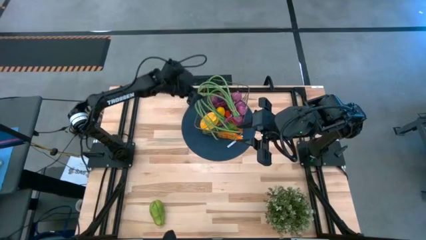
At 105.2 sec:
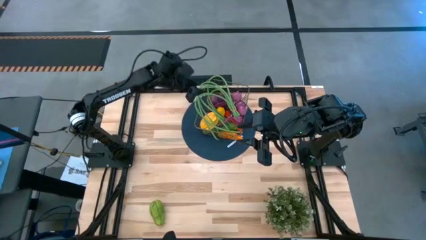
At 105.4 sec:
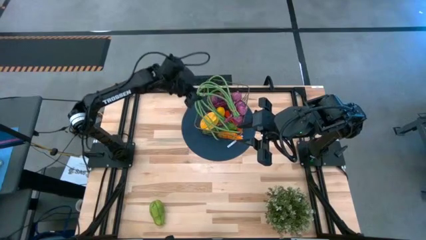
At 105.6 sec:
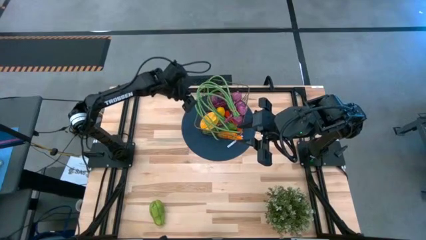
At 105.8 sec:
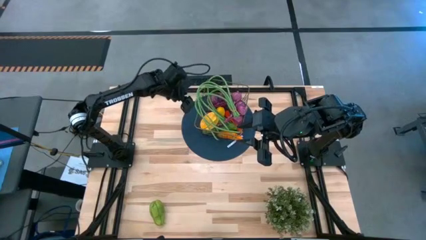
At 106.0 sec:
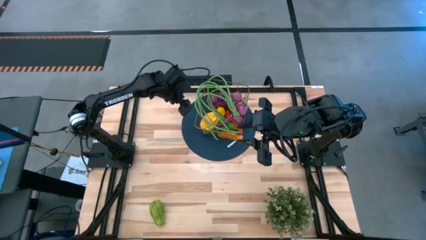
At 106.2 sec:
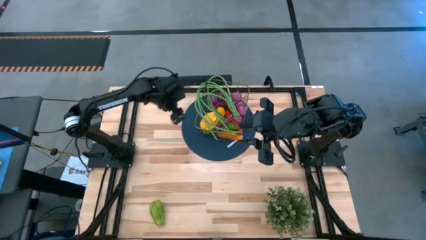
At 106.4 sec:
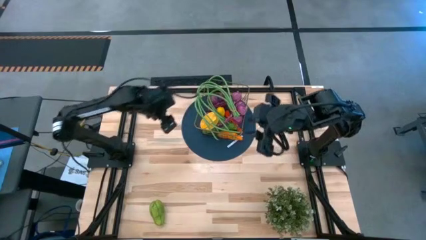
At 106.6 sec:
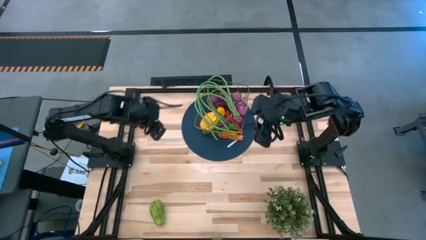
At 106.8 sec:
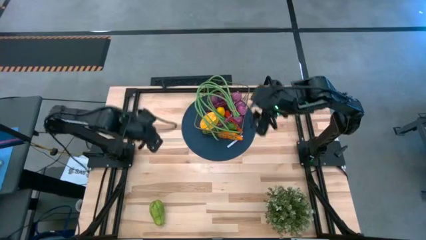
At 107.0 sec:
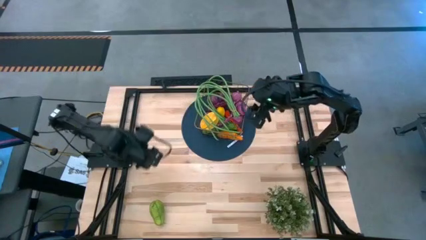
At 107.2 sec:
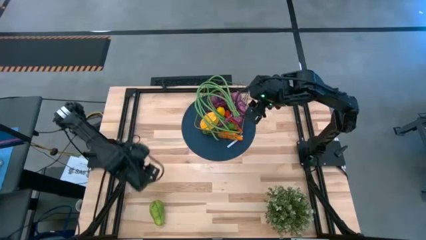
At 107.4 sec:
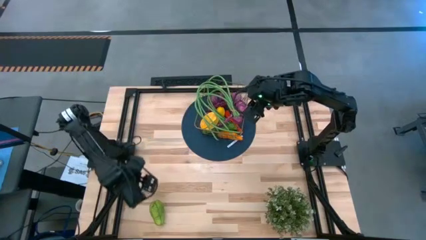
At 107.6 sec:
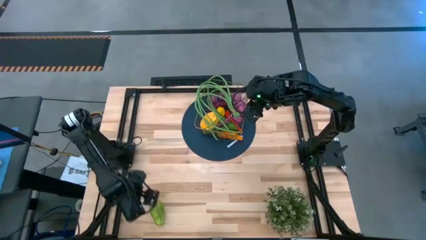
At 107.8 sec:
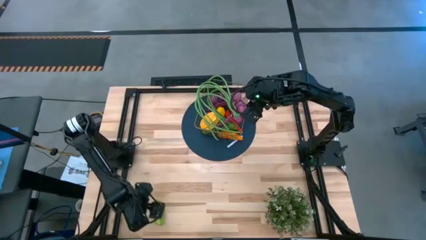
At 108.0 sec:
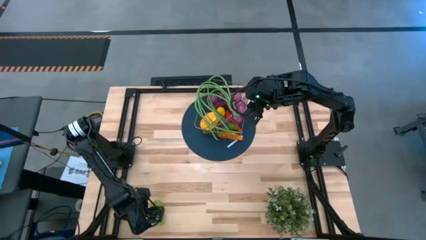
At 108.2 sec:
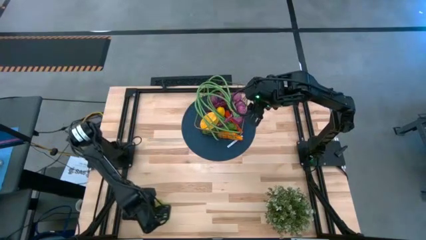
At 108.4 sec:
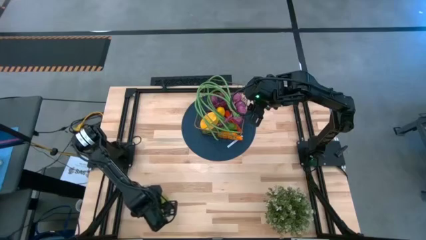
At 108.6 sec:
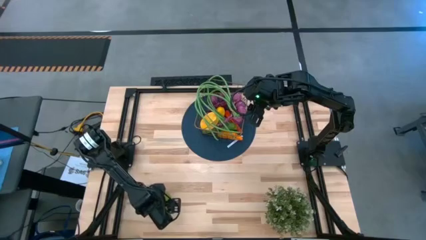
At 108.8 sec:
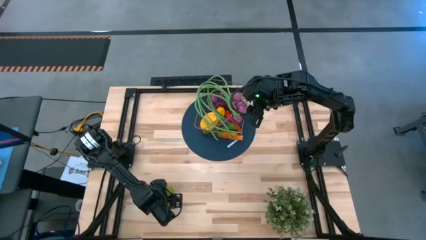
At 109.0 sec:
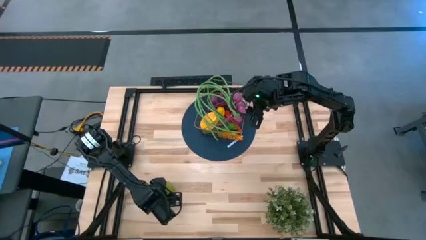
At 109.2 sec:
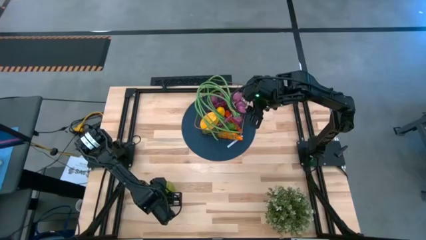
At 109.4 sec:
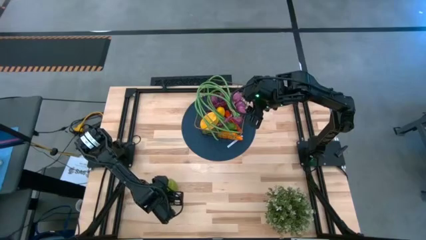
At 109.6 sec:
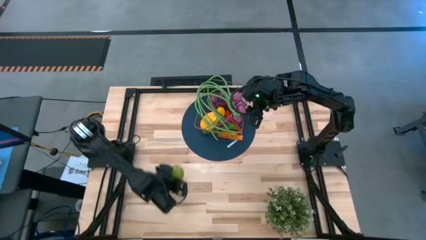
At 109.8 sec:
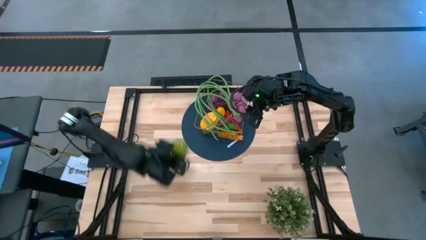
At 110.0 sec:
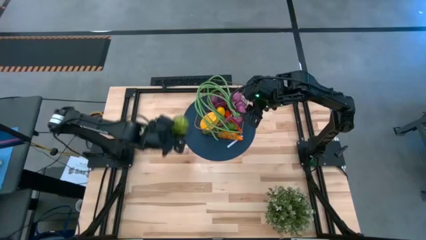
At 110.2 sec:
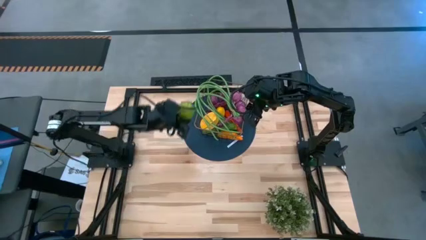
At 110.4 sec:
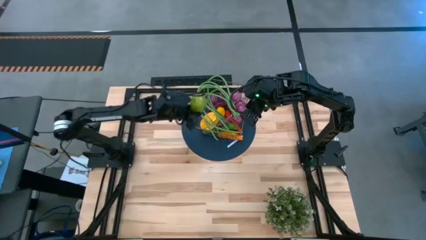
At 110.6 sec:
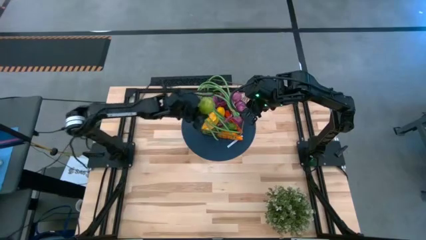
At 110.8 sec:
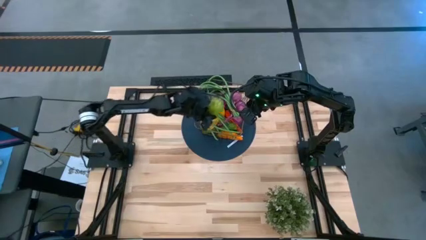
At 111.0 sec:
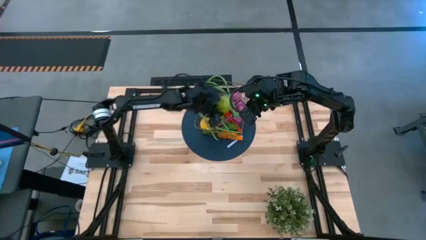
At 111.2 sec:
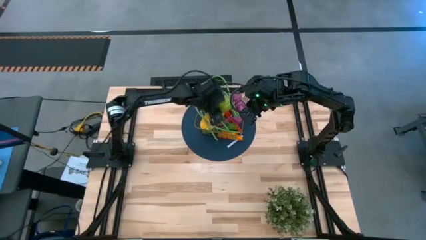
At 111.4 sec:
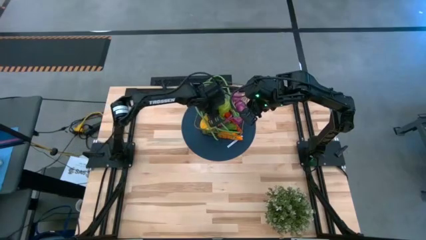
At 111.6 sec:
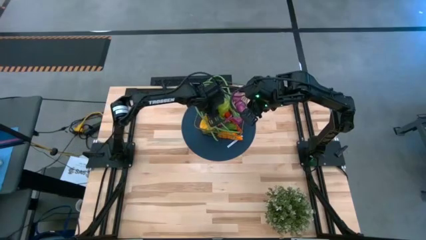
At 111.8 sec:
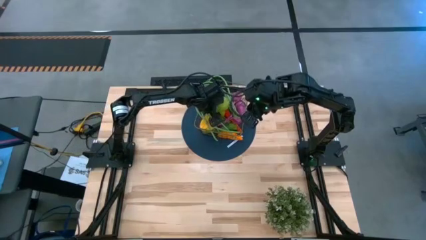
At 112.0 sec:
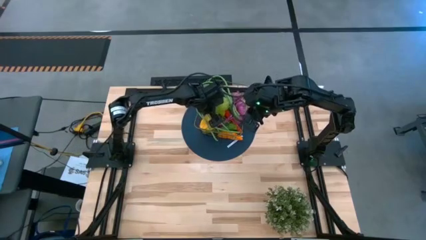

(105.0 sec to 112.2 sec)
Task: Build produce basket
Put the chayote into the wire basket

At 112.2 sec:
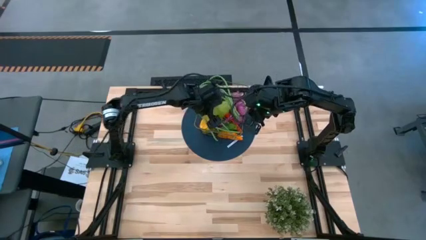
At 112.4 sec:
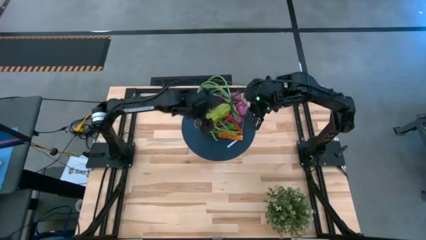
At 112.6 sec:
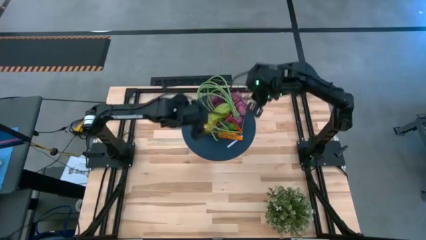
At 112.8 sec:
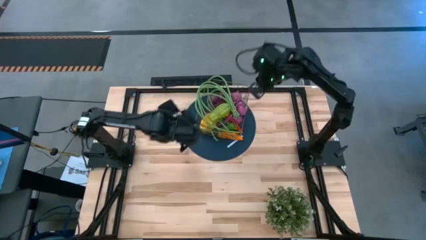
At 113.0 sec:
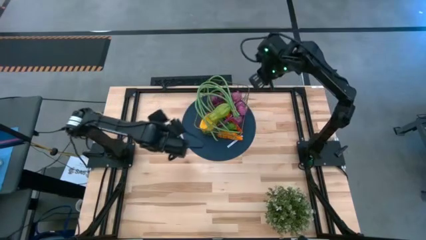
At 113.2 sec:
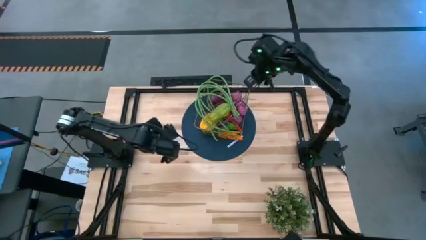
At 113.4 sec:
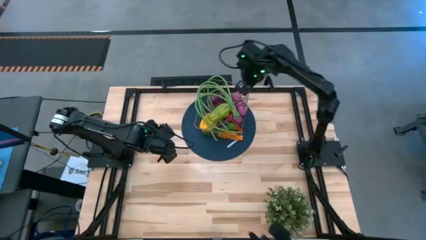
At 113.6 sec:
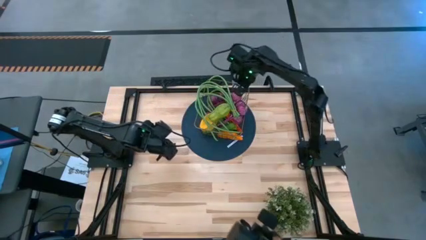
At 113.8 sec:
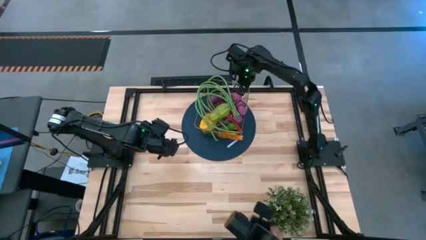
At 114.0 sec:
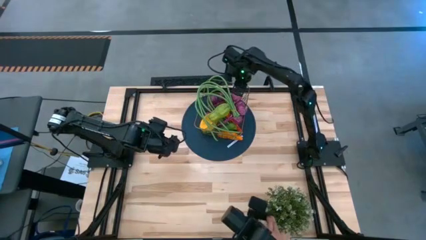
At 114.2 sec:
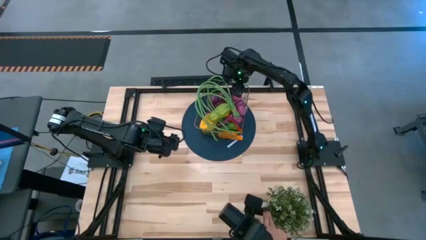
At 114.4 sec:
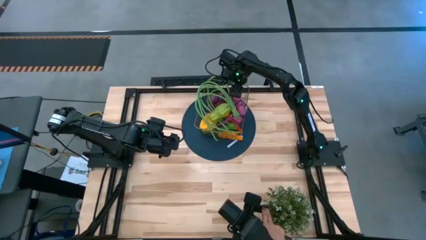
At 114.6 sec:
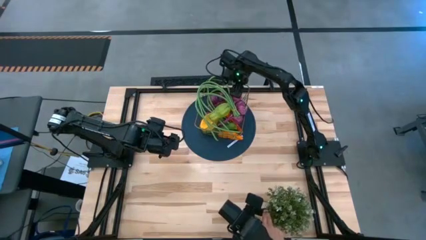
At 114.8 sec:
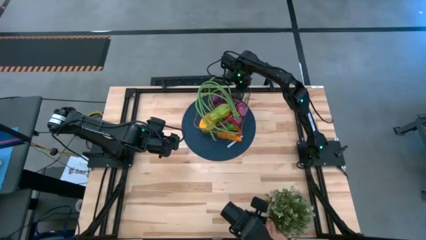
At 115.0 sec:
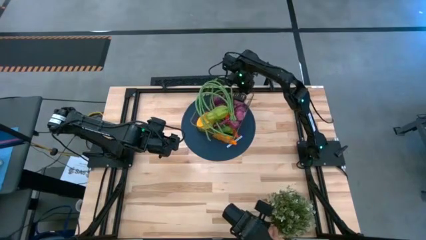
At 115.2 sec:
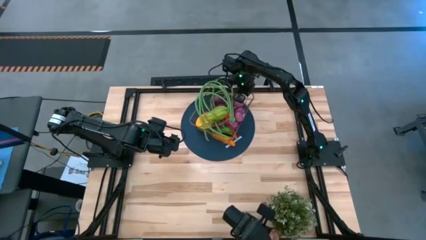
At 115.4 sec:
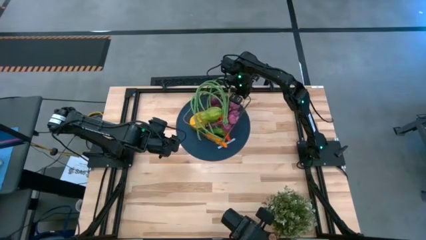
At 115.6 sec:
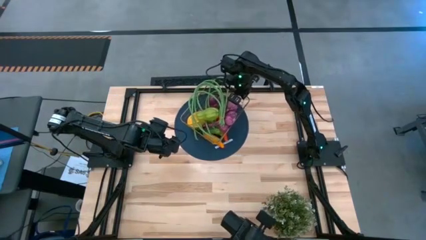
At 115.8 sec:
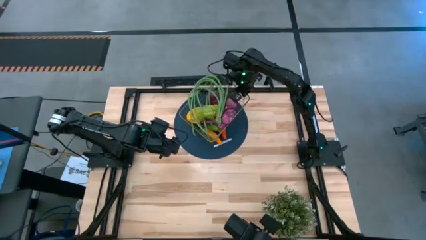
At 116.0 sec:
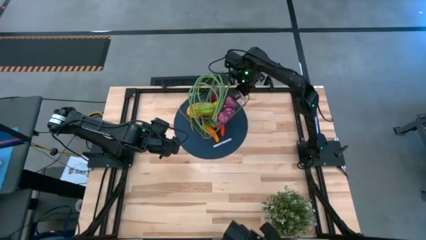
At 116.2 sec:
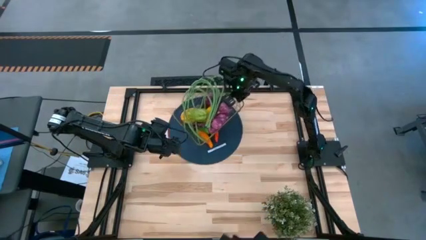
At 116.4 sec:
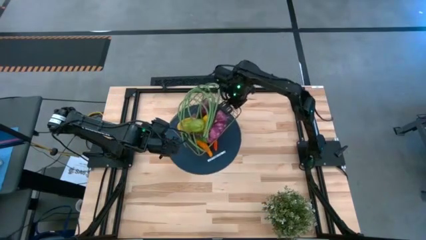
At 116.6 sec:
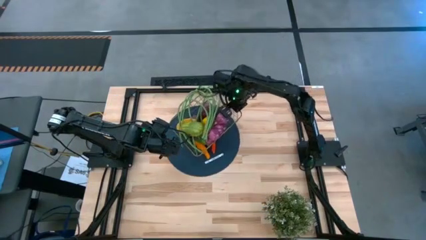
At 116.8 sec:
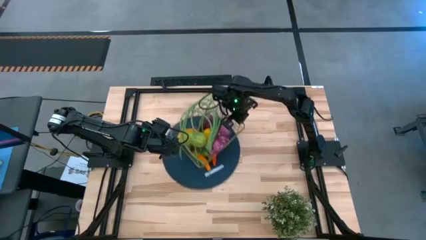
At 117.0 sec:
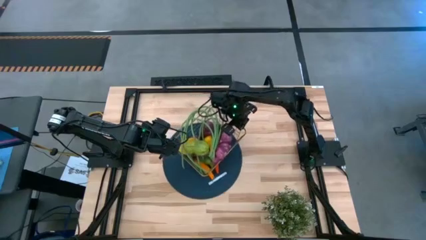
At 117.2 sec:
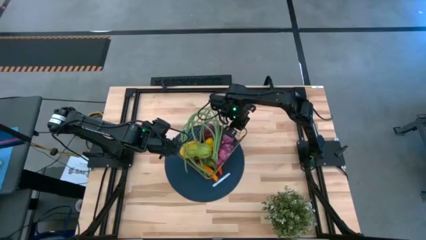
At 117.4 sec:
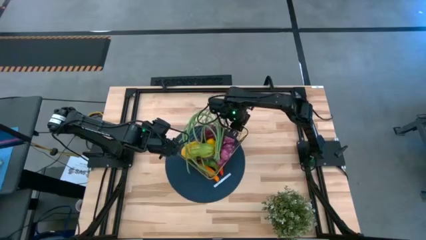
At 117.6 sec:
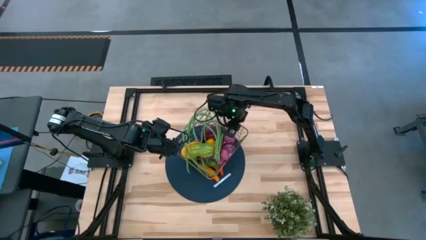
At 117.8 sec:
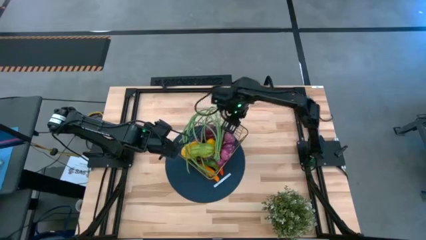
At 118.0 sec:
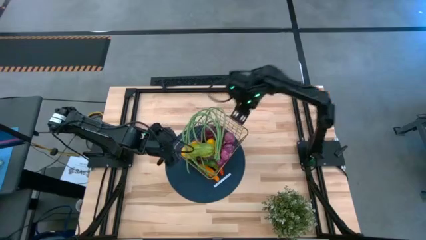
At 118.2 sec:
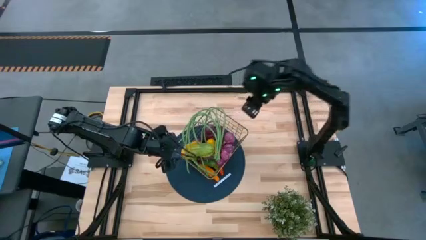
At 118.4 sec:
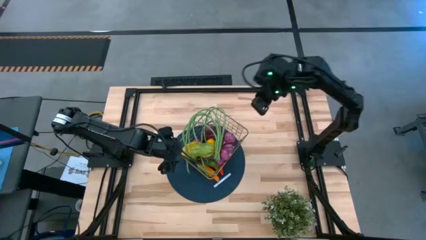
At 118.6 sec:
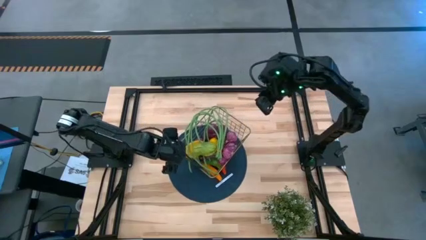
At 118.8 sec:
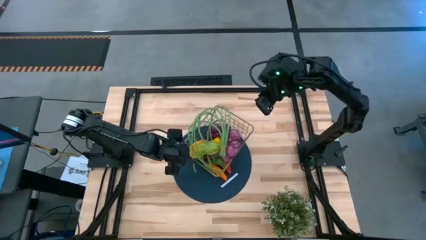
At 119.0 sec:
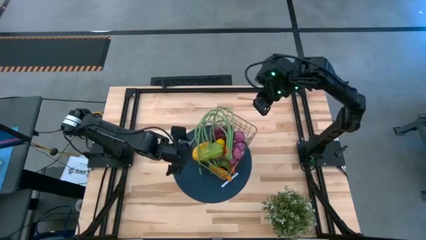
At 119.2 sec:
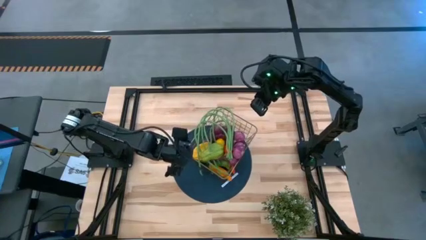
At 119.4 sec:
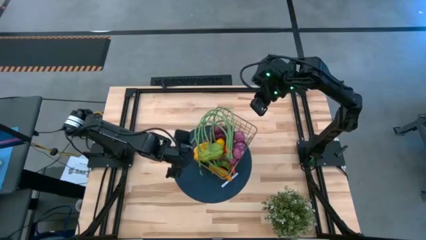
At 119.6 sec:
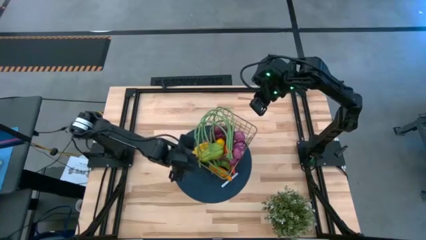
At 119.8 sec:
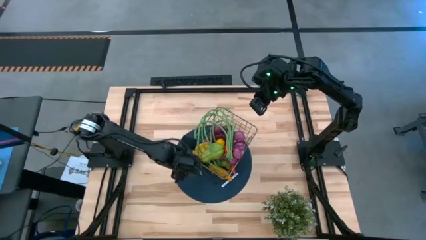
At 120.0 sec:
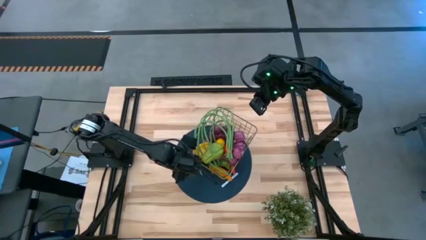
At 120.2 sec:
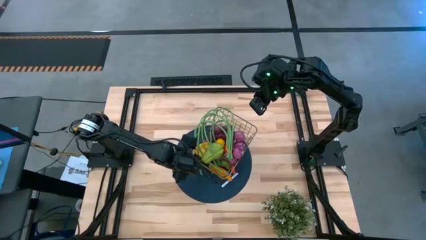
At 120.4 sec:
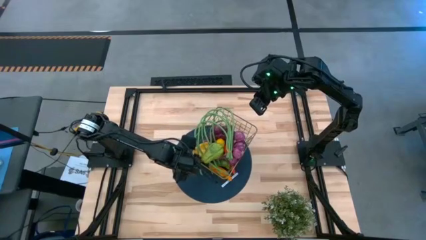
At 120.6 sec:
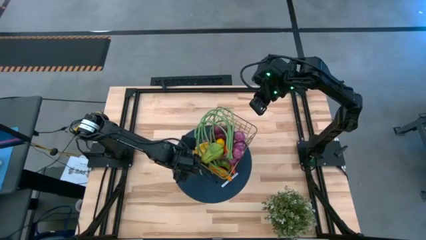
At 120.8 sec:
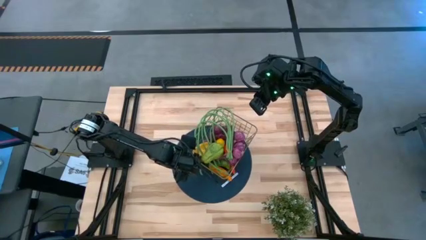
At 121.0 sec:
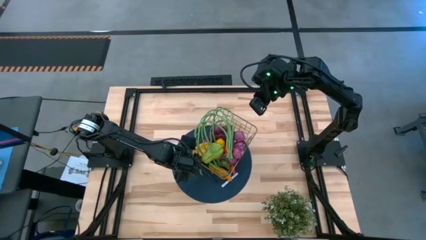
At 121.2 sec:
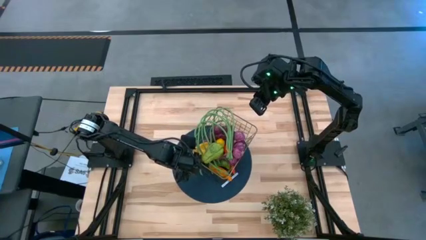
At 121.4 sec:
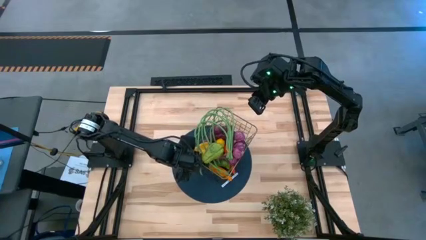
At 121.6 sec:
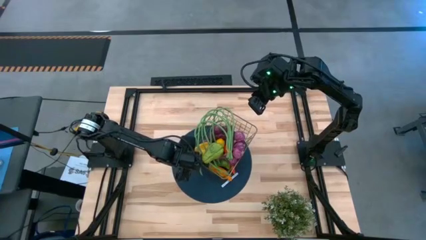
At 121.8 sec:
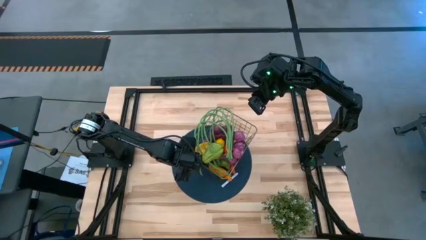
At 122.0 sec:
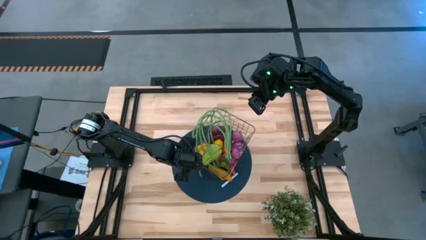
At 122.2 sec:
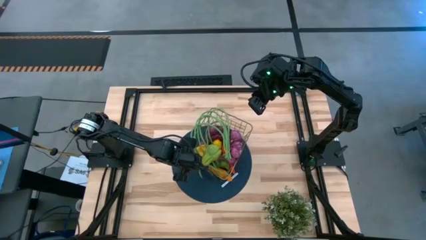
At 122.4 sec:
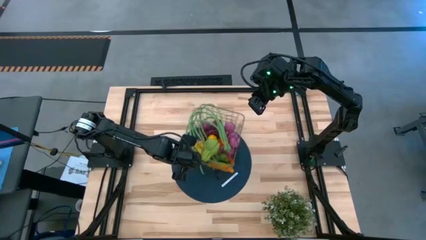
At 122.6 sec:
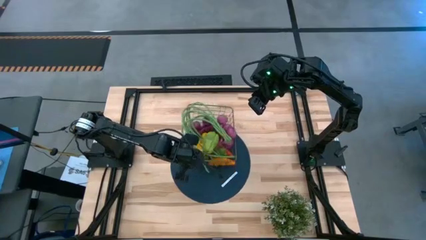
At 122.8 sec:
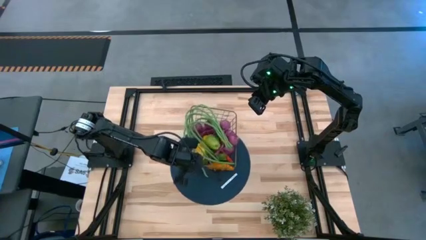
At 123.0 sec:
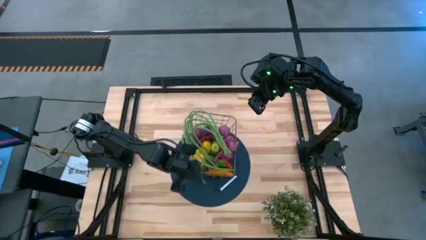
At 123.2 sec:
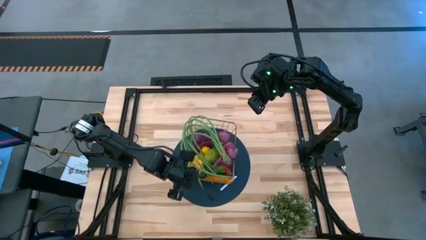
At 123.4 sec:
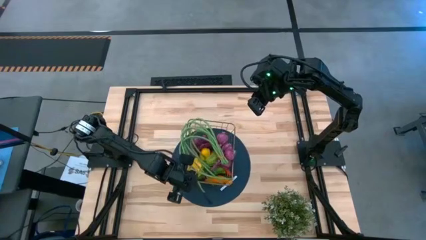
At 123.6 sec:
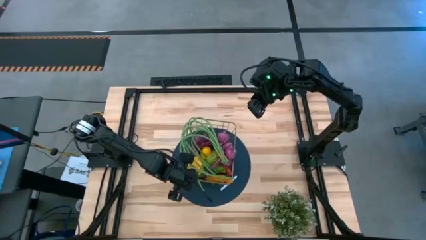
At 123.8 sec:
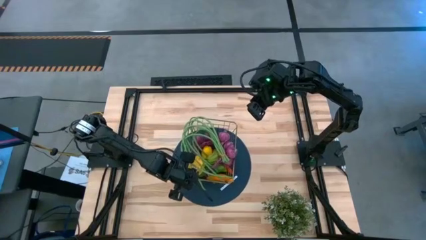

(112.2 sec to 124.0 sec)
Move the basket to the center
